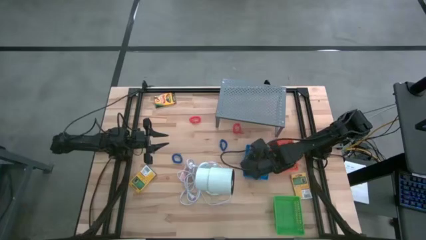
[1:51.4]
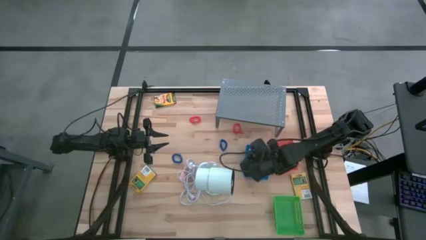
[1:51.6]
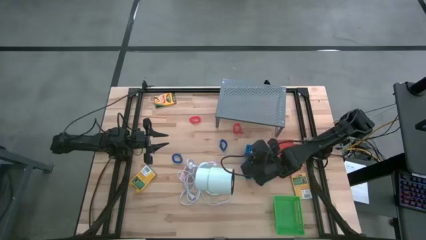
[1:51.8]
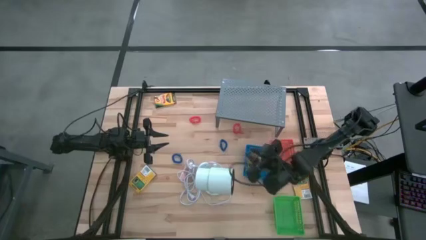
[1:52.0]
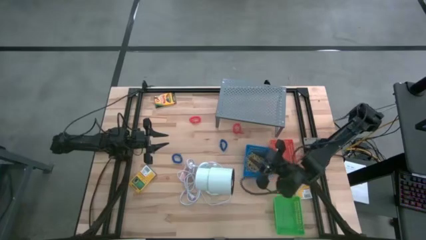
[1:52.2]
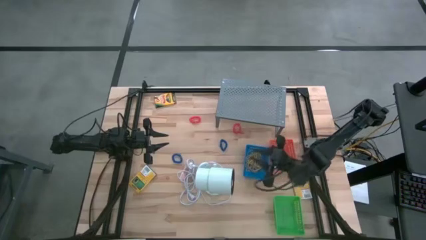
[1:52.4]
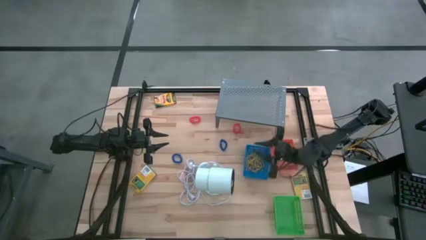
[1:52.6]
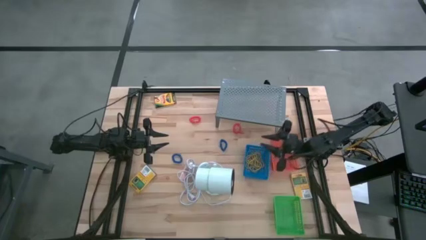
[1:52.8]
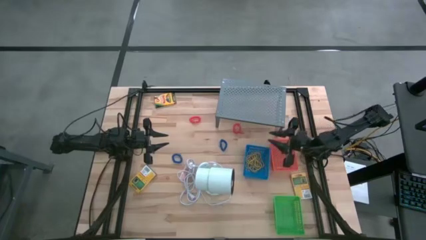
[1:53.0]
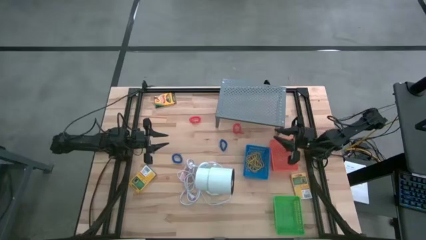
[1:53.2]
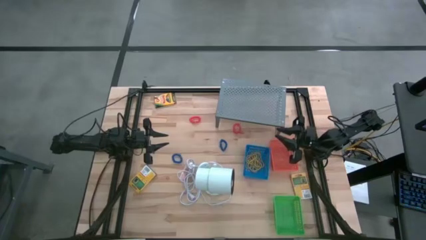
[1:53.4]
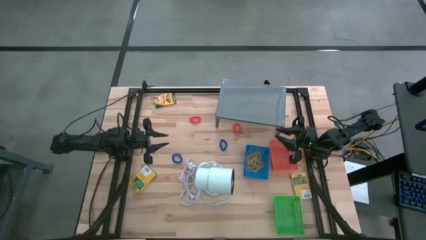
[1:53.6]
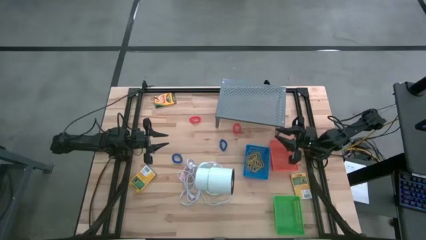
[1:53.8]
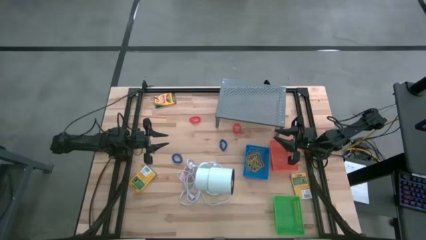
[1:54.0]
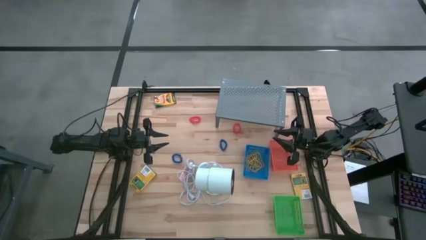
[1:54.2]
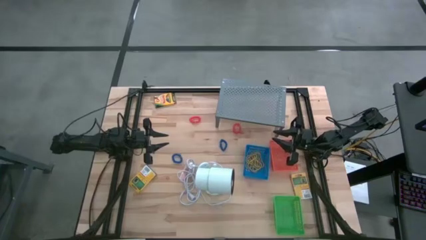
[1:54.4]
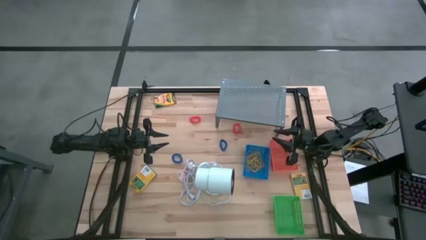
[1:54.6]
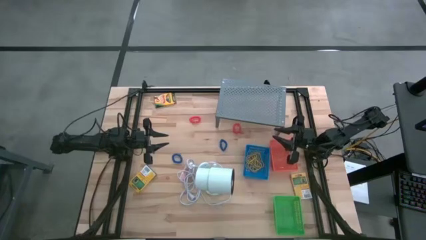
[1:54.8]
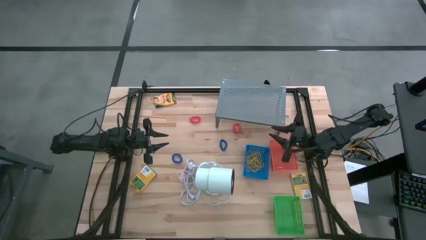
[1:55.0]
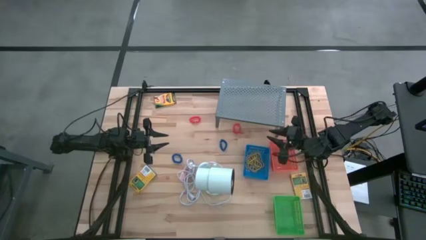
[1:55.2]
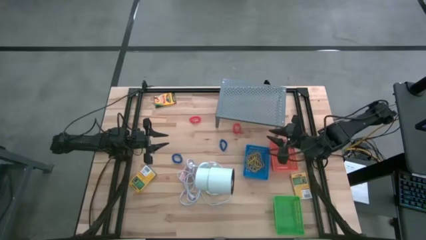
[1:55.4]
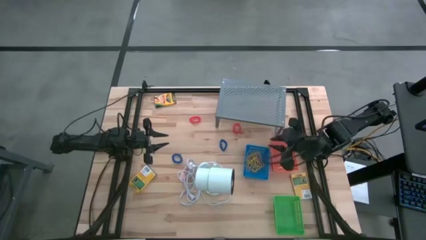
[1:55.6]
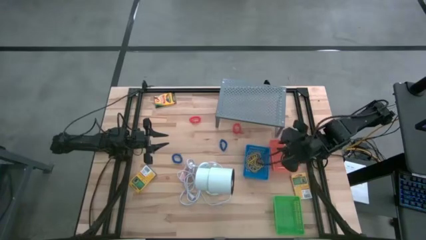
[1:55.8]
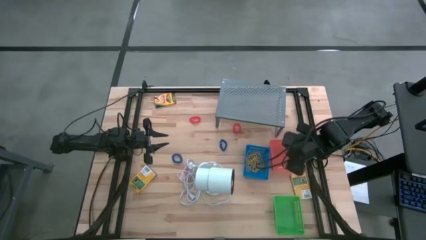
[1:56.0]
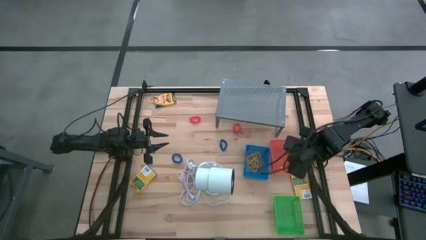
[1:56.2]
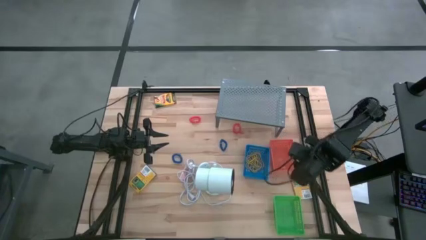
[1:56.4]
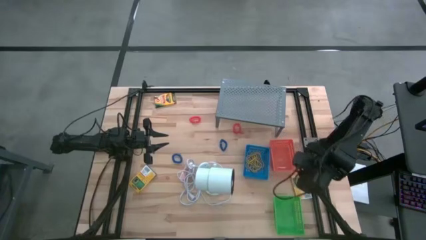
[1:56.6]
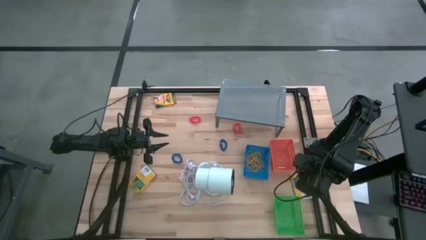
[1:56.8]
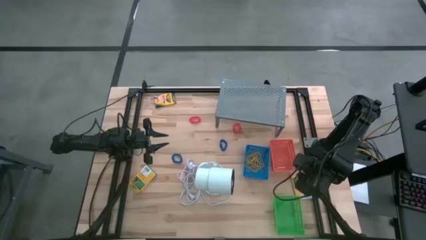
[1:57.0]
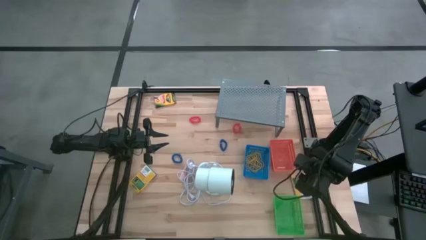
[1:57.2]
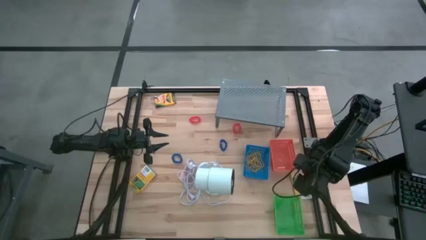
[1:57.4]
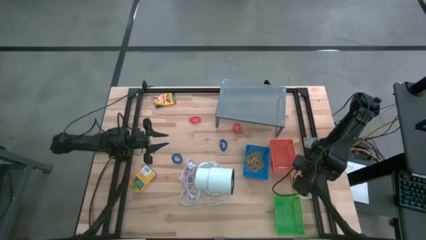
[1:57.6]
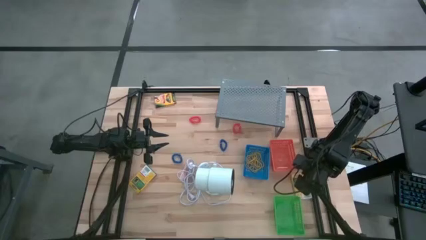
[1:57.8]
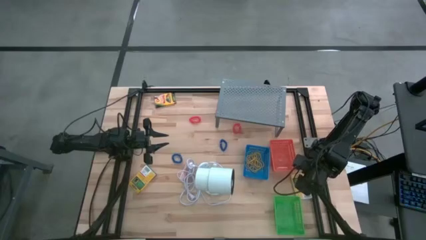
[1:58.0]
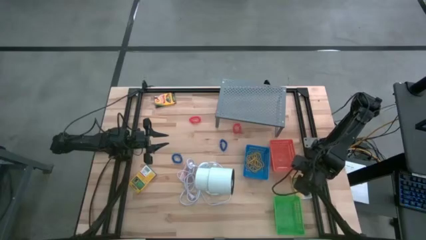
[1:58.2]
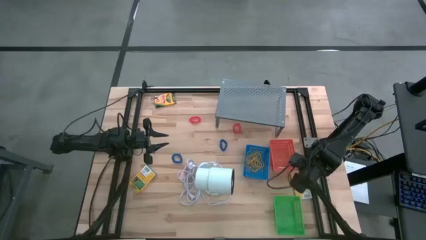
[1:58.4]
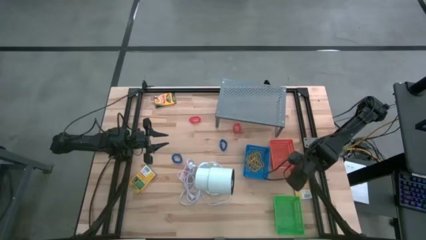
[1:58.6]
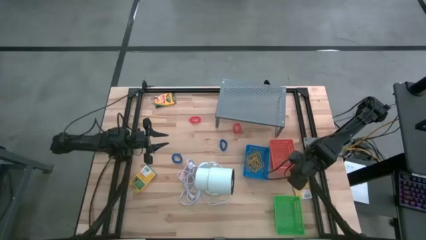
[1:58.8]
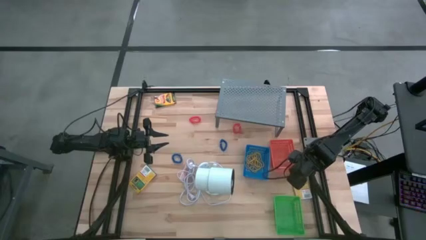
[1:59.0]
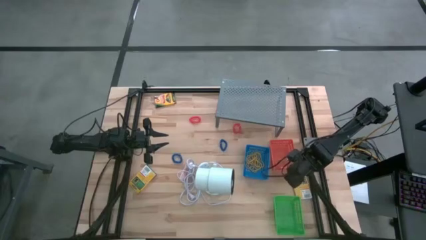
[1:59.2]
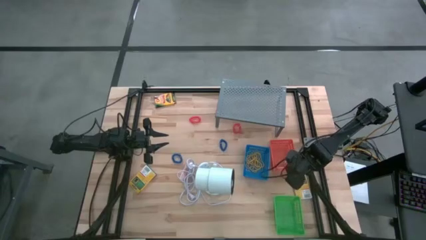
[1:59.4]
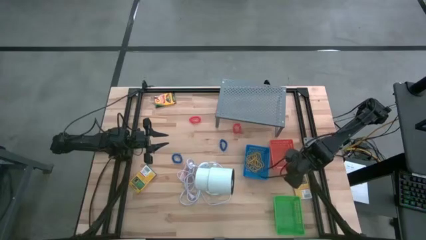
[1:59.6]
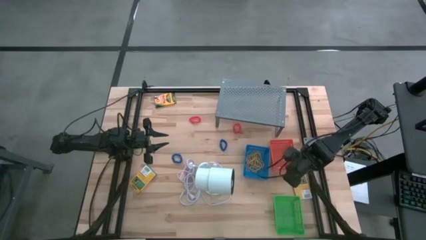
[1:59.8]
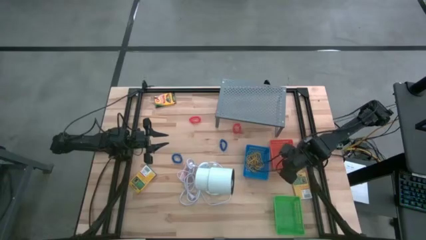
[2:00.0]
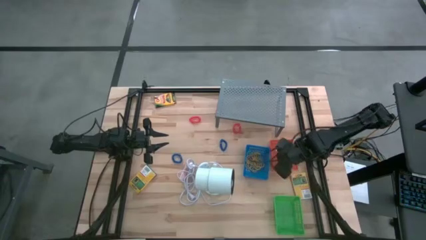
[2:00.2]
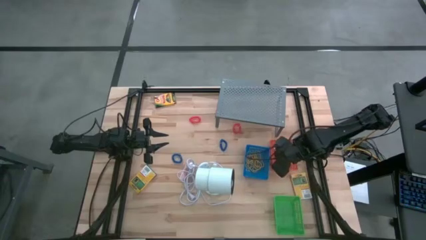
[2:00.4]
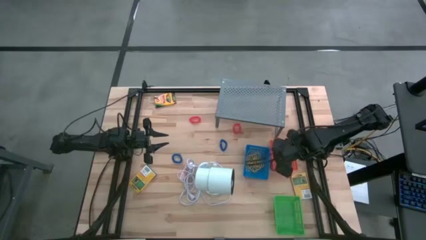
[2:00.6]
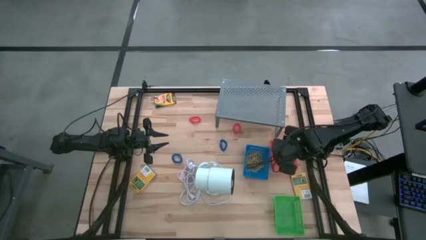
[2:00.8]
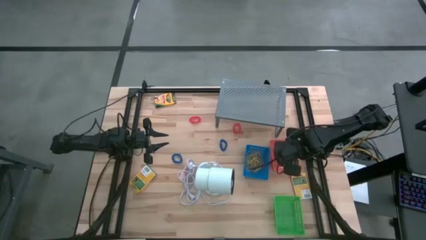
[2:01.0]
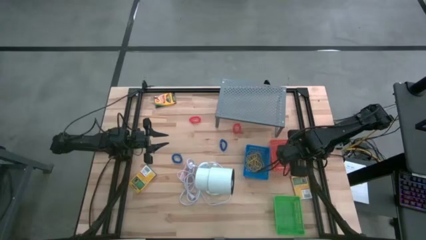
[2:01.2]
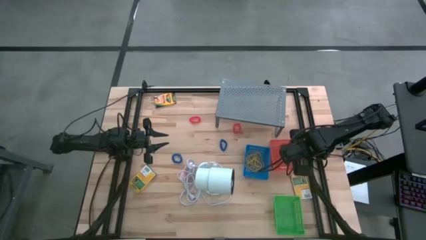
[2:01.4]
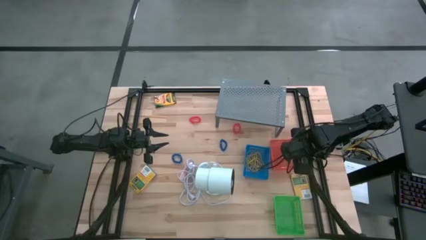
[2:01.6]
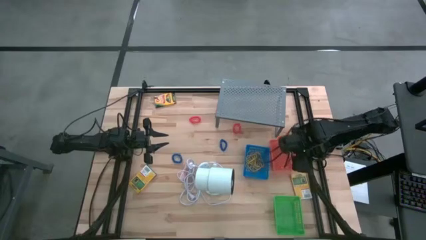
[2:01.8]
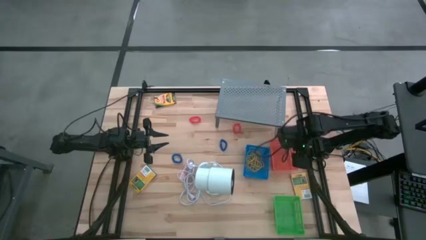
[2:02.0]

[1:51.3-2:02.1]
Task: Pick & Place Office Desk Supplies
Put the yellow box of crayons into the orange bin

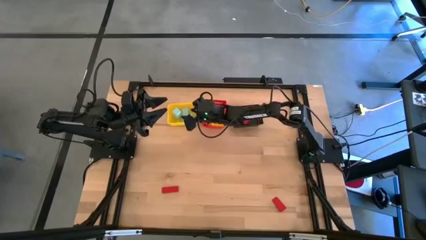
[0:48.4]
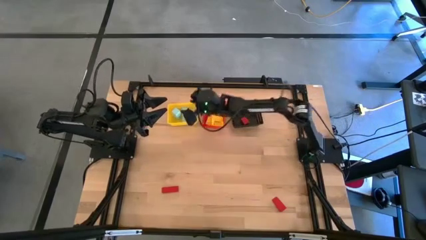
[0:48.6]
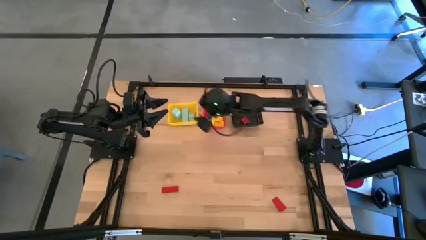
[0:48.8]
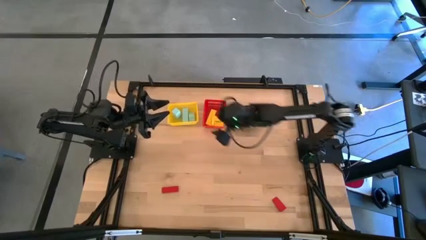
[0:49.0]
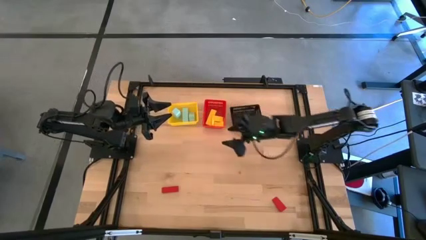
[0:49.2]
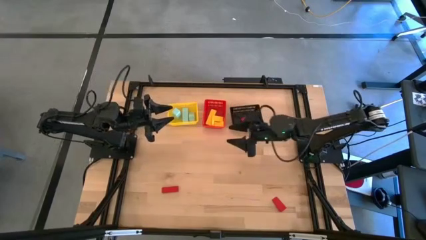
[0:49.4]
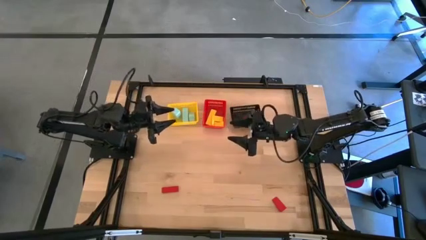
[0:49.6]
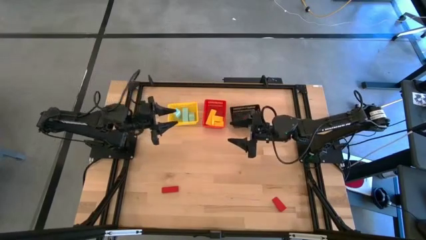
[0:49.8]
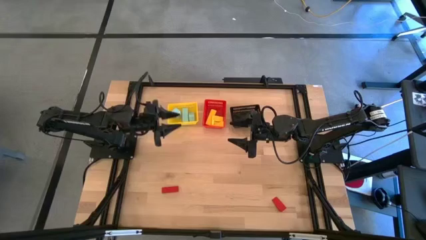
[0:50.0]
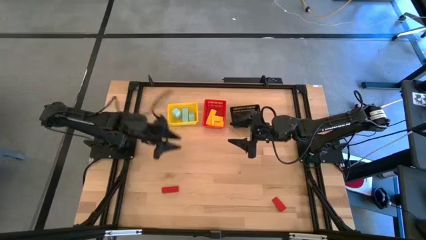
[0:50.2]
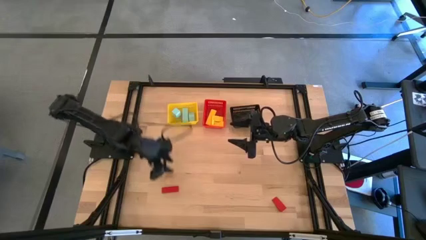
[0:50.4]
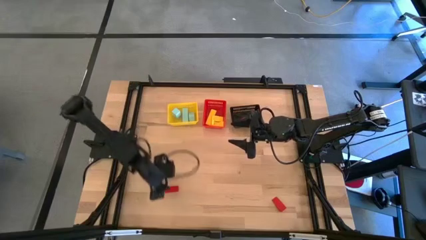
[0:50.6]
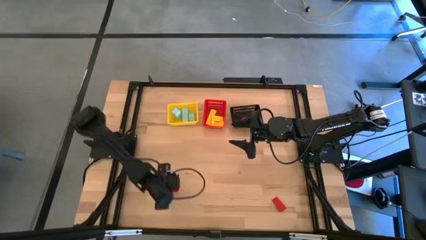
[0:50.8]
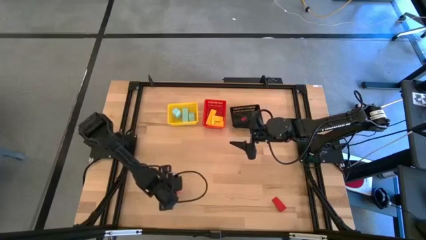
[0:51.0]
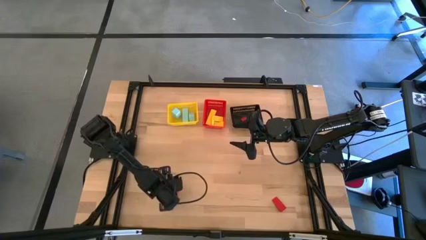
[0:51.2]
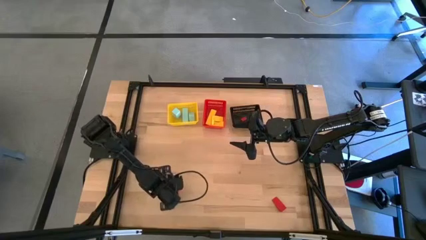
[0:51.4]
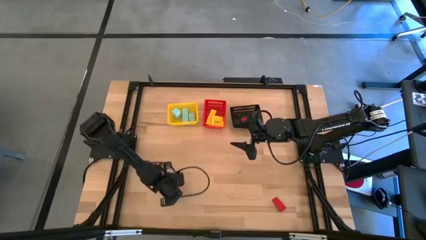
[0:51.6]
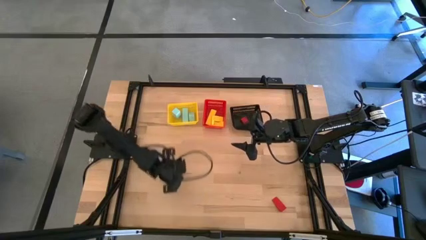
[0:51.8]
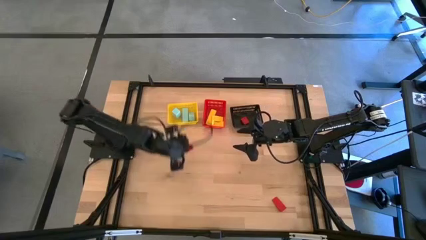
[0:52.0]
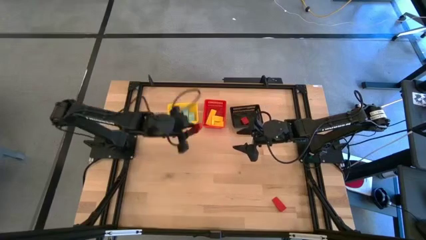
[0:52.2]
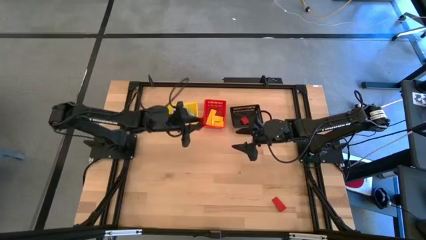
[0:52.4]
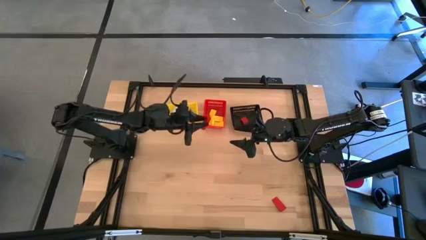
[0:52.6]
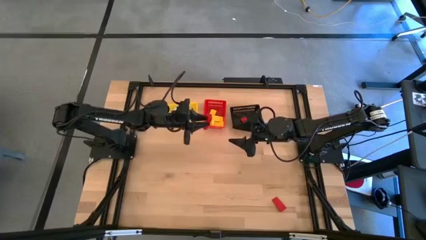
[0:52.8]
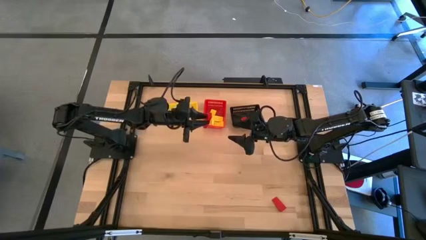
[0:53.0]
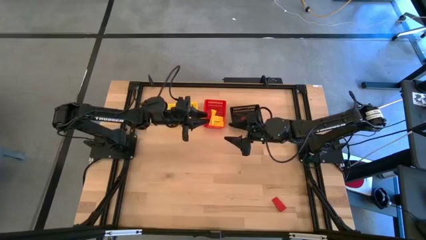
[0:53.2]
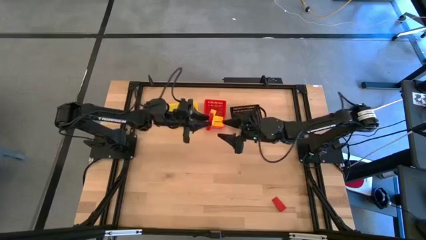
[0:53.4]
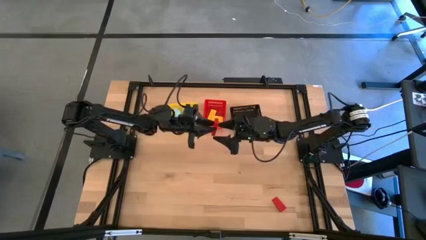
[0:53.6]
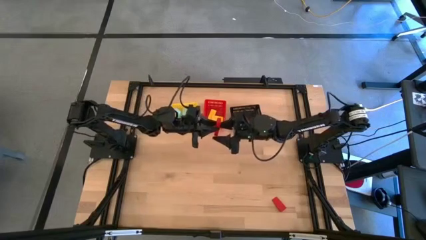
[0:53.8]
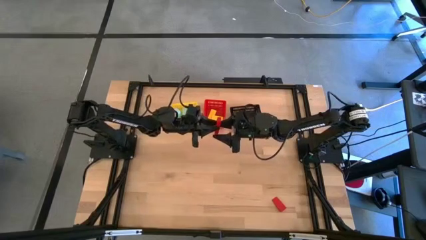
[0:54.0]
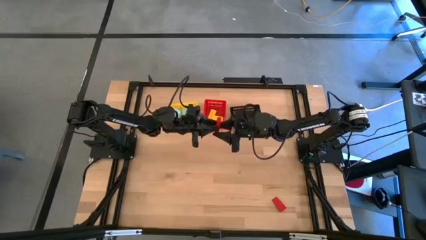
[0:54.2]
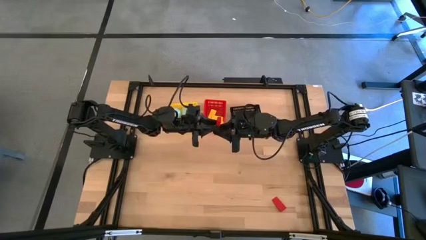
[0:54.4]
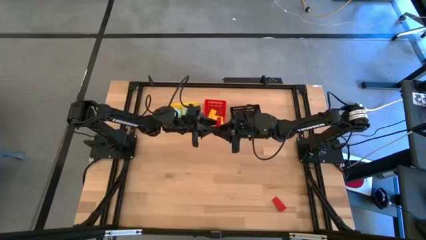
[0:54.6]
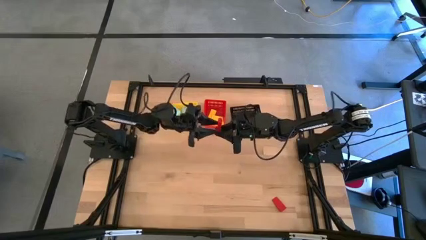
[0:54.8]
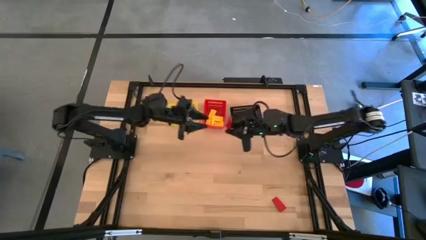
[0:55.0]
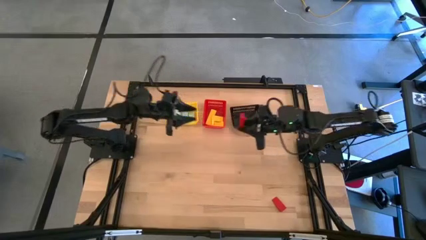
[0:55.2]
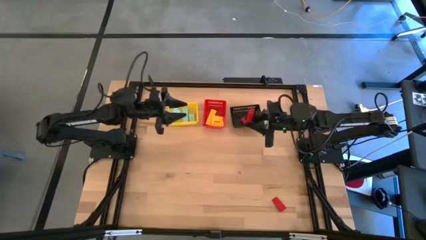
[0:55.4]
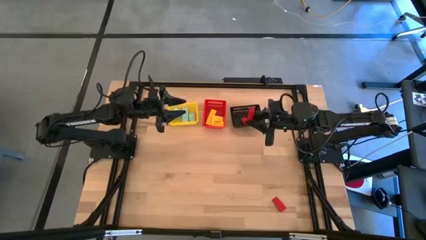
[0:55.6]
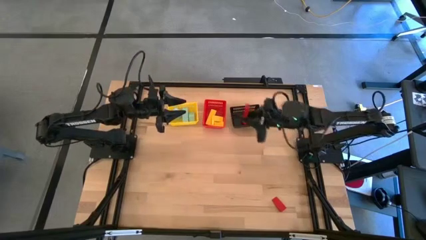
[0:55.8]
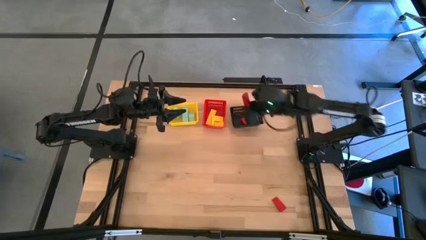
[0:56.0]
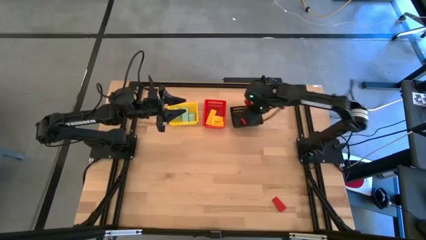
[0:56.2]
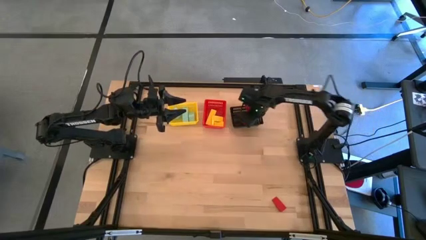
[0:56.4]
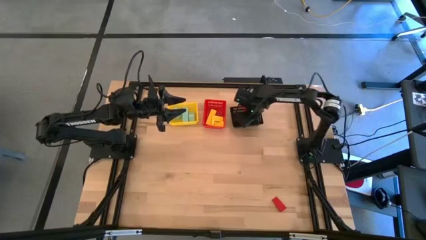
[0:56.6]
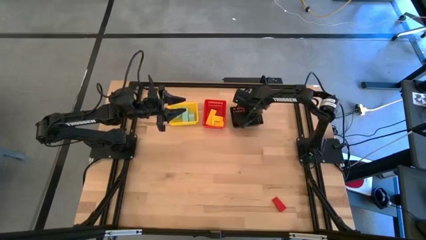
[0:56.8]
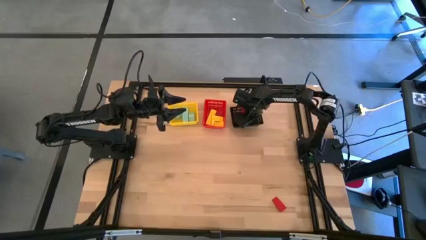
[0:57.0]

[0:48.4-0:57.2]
Task: Sort & place blocks by color
Put the left red block into the black basket
